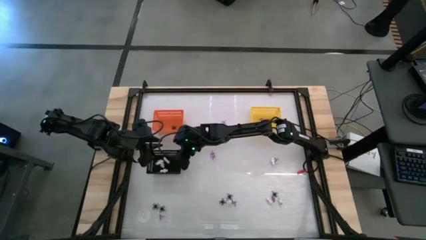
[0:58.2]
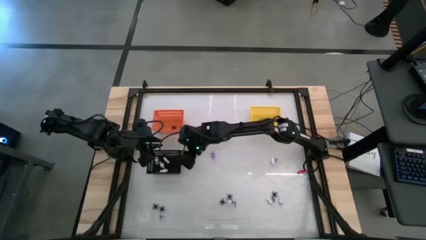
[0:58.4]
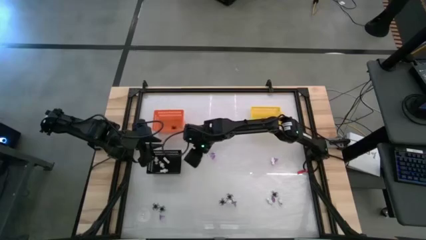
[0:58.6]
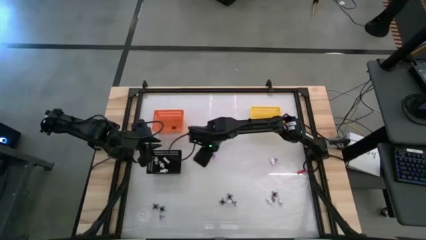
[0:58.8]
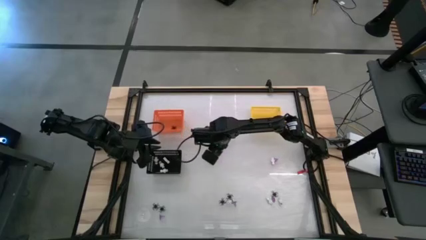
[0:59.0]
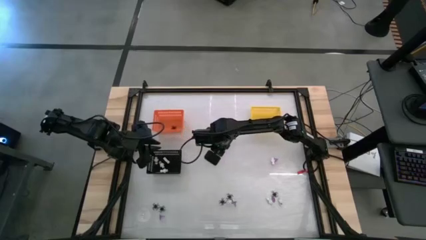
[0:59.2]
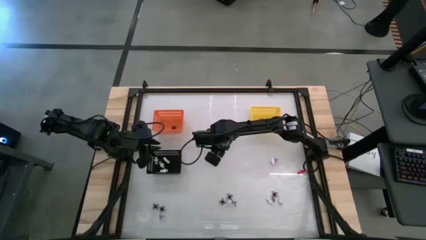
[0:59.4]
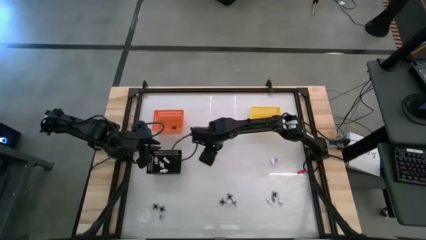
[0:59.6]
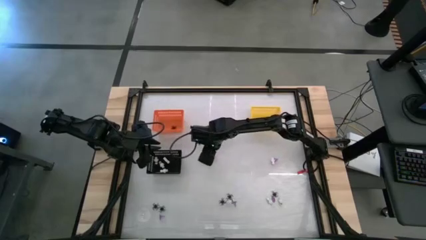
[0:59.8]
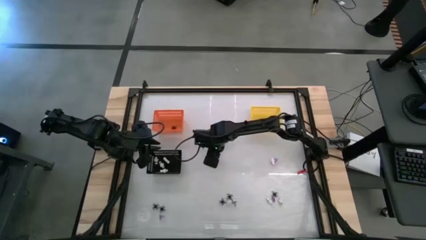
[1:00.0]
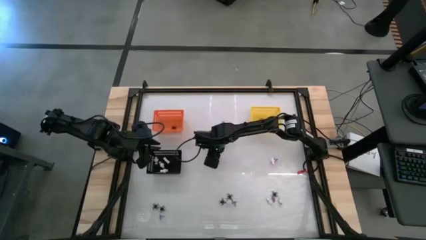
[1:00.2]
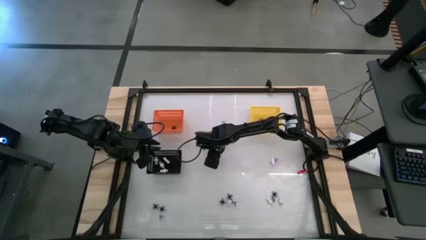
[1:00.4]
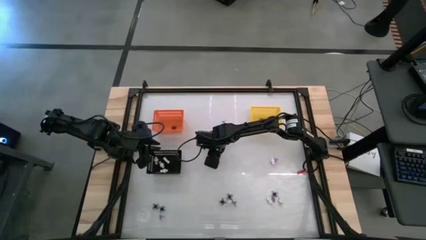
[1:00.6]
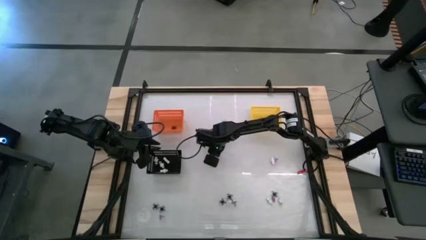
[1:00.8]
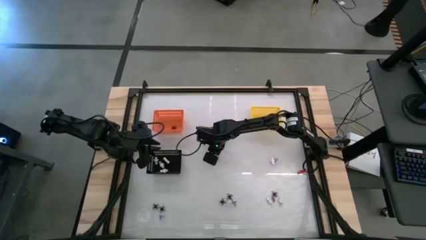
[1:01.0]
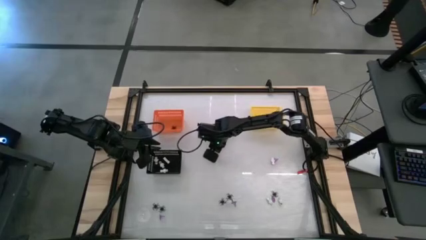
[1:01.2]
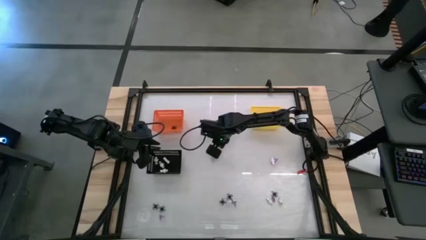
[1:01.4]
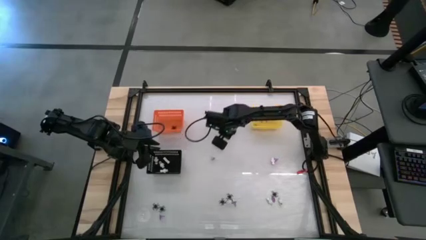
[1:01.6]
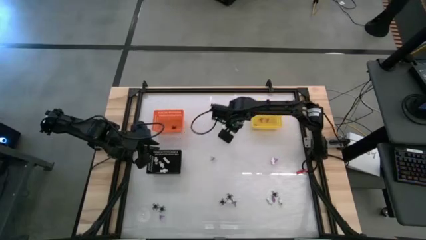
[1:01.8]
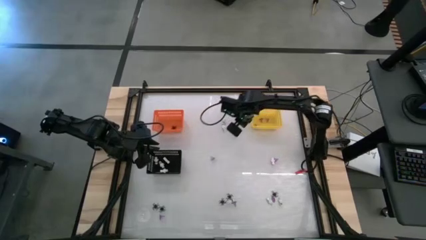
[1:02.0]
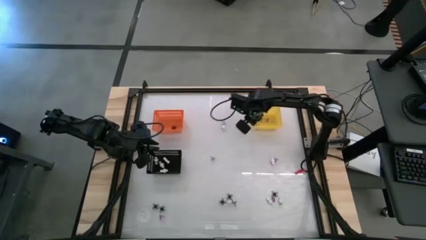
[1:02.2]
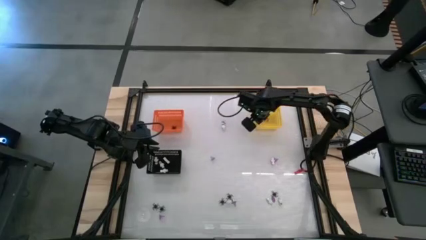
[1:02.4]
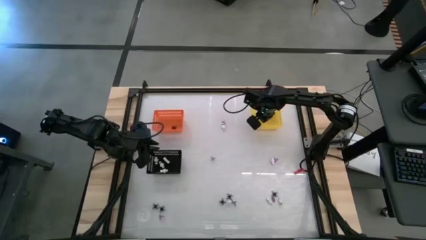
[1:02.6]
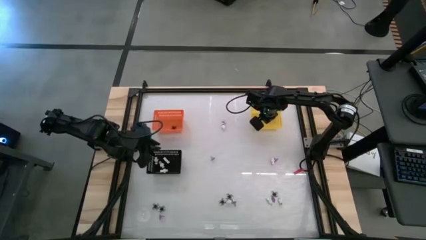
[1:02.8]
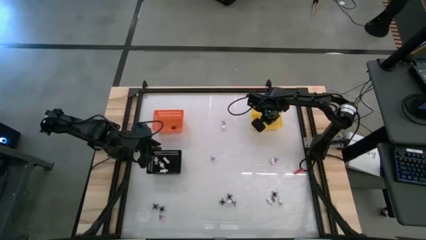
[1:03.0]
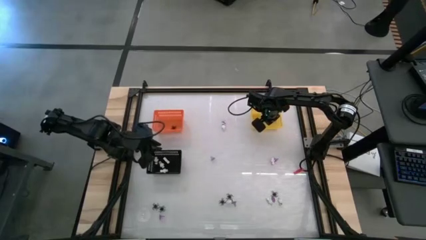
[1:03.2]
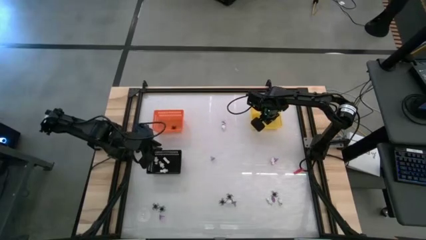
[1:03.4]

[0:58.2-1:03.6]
Task: Sort Halloween decoration
Put the violet witch hat into the yellow bin

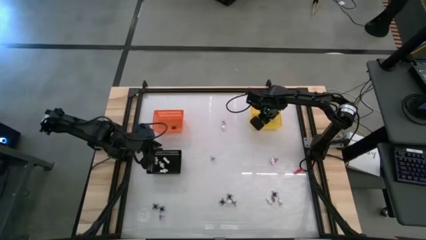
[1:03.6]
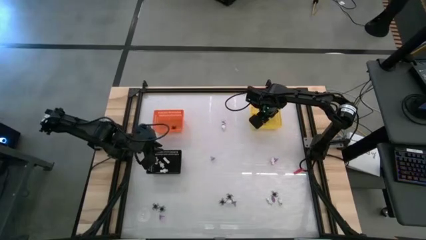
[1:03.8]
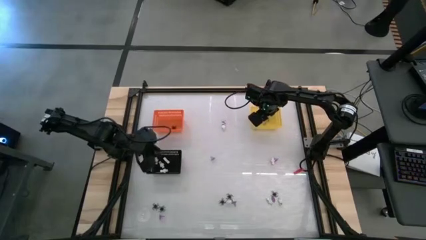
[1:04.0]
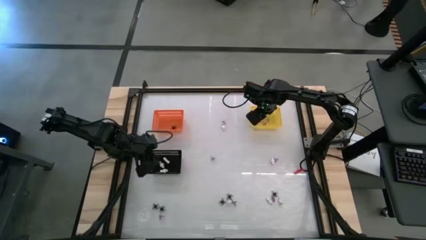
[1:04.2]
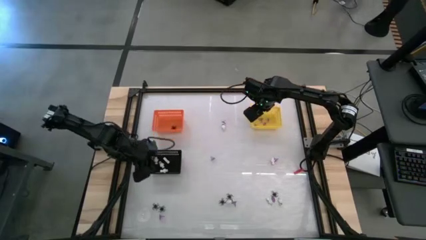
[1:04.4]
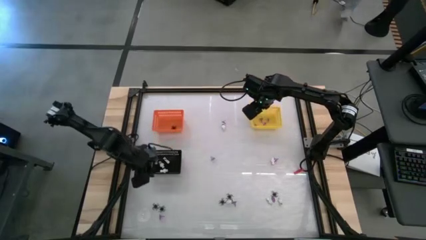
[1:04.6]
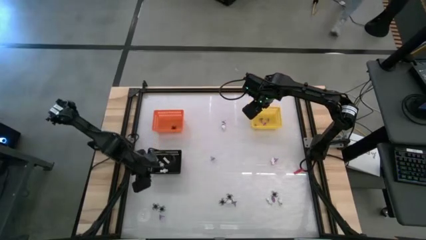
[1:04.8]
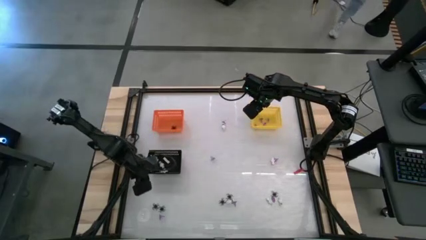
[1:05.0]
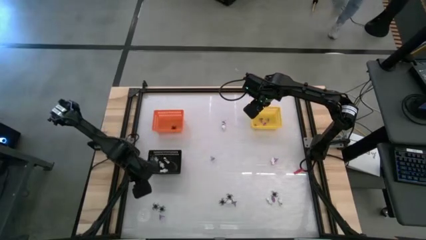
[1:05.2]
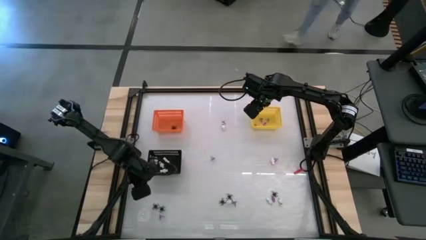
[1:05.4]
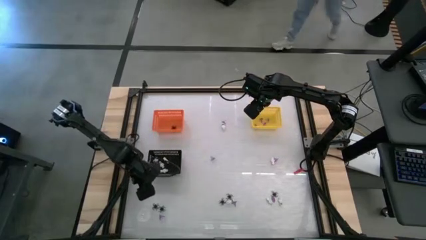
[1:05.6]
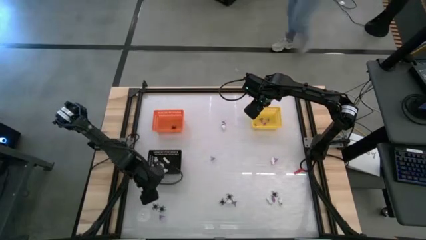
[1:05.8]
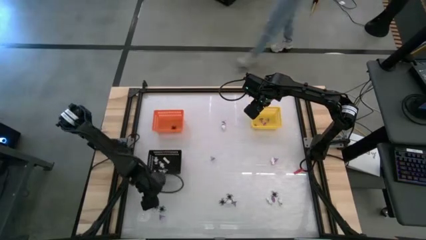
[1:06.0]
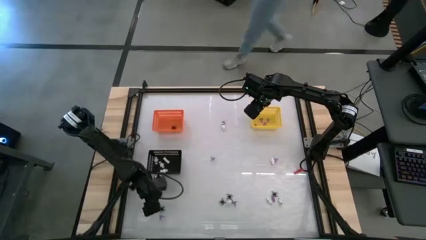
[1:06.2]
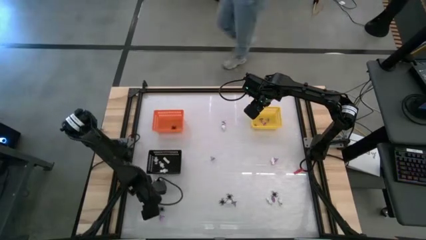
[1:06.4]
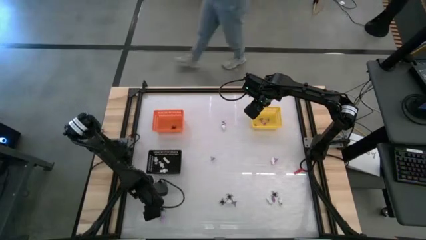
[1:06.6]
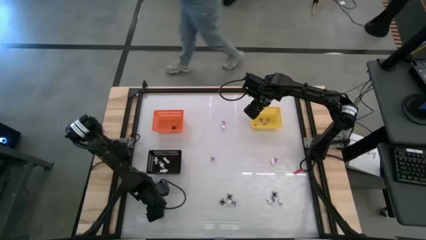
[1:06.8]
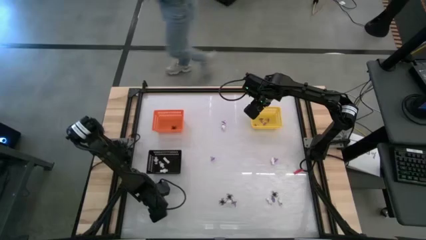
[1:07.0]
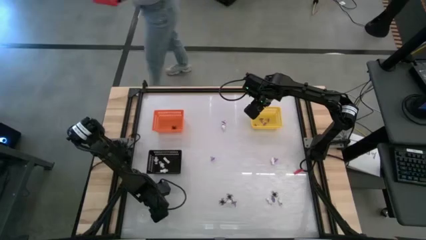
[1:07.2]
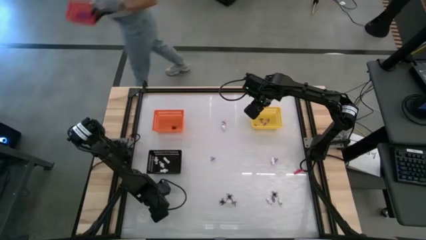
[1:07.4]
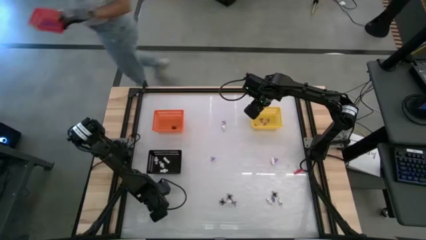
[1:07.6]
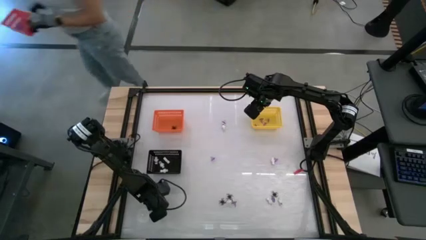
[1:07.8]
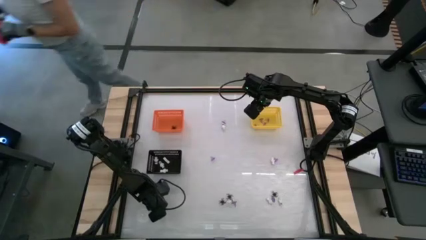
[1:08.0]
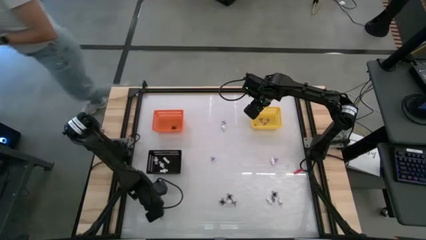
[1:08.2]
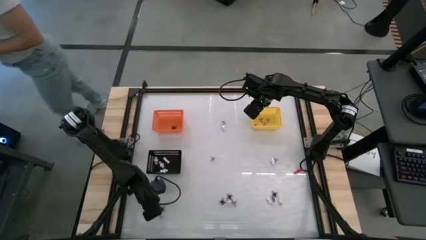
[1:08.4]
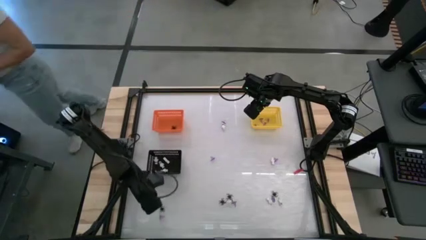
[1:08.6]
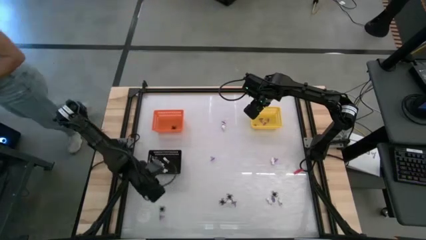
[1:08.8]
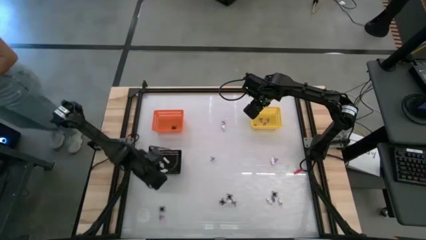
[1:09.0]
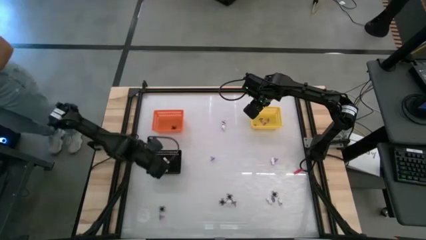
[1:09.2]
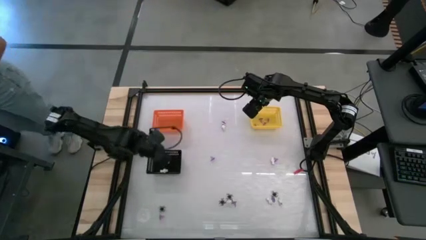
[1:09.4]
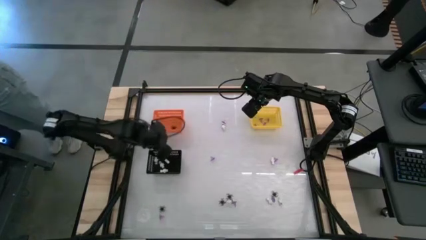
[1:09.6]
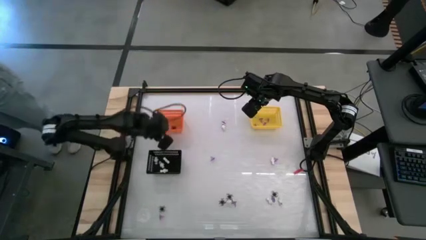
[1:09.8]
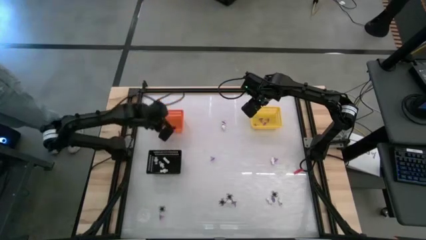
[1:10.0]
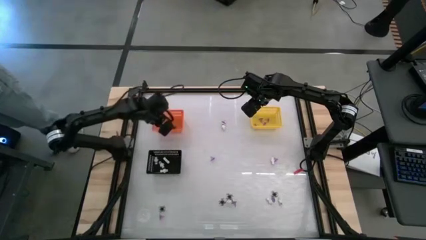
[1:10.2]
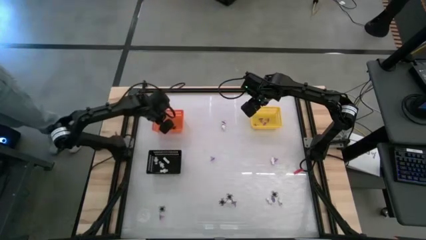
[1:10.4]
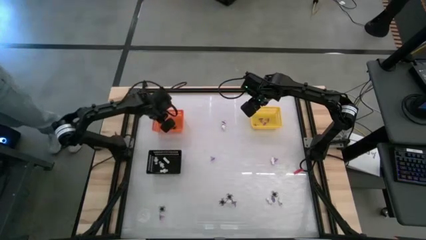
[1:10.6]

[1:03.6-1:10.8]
Put the black spider toy into the orange bin

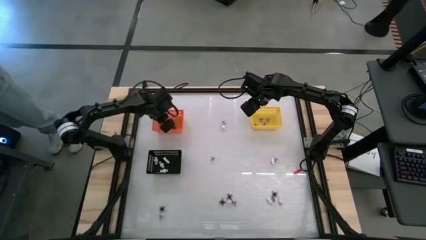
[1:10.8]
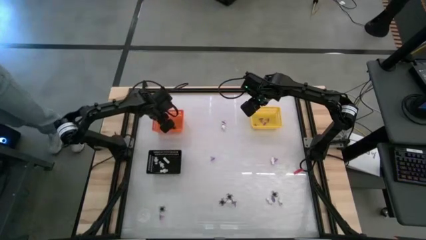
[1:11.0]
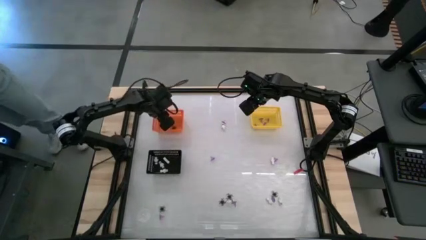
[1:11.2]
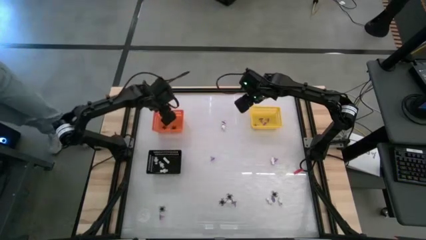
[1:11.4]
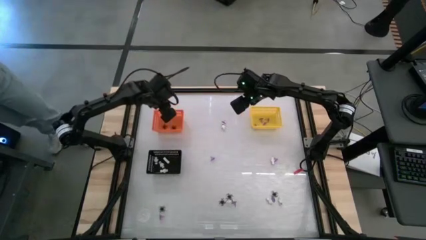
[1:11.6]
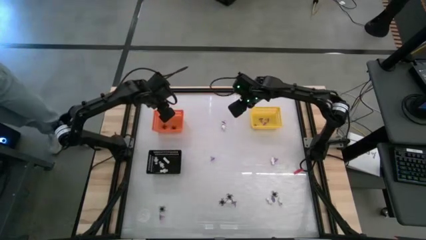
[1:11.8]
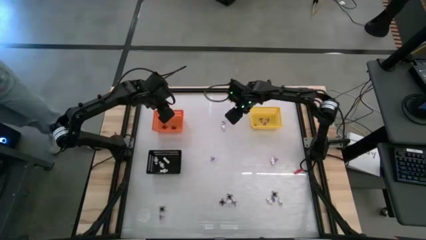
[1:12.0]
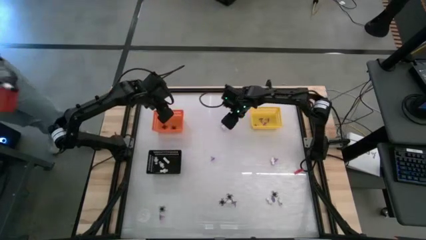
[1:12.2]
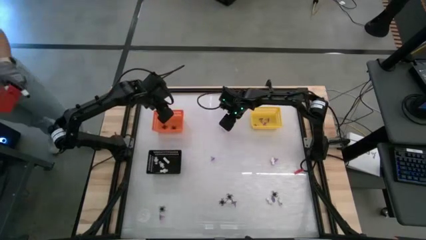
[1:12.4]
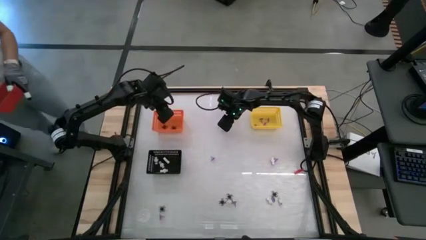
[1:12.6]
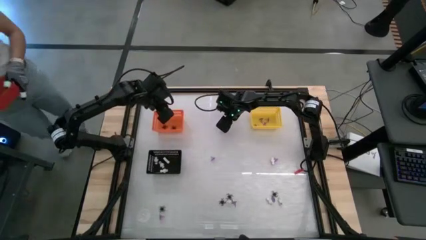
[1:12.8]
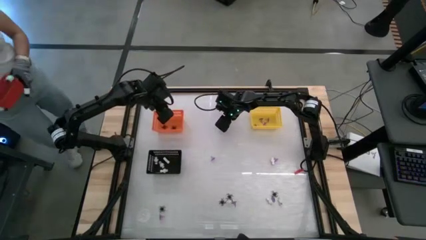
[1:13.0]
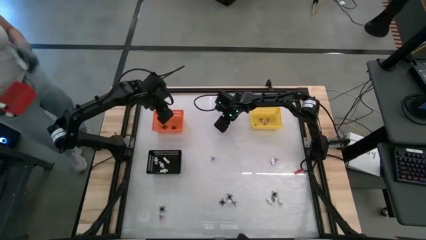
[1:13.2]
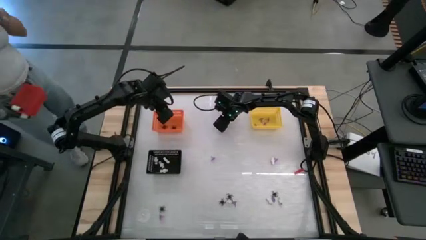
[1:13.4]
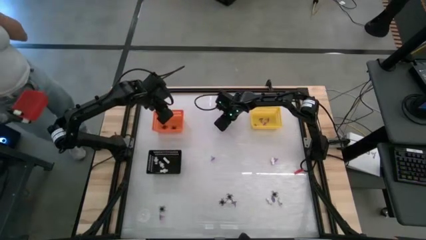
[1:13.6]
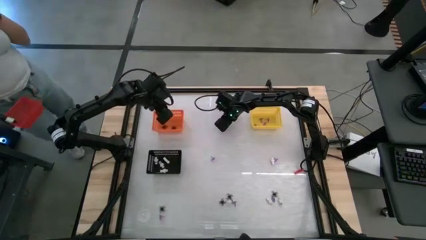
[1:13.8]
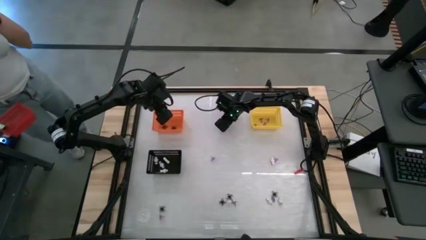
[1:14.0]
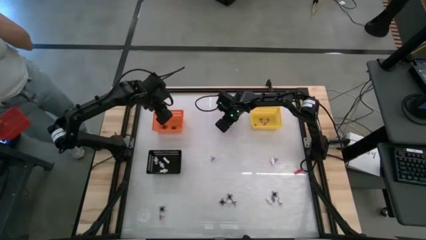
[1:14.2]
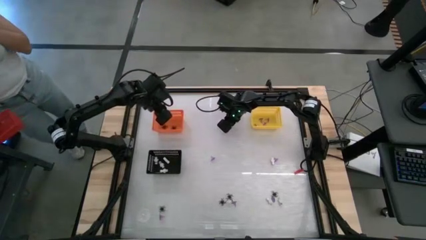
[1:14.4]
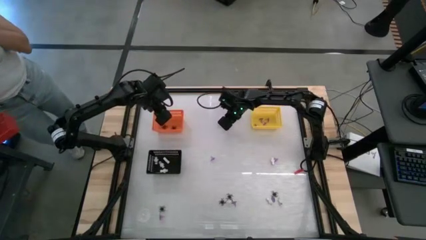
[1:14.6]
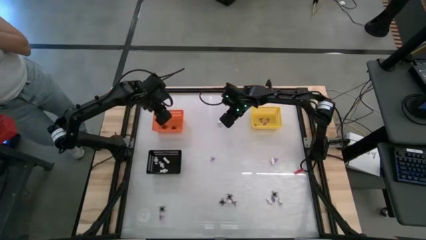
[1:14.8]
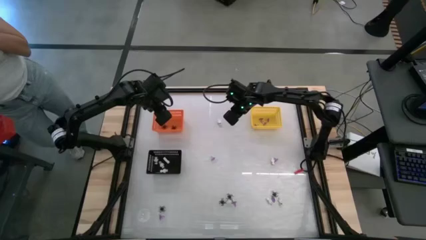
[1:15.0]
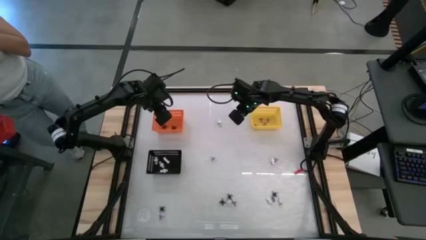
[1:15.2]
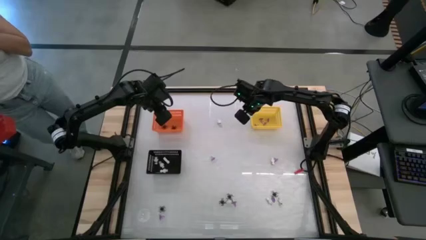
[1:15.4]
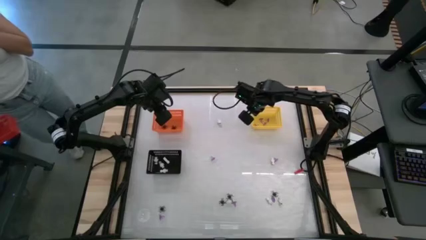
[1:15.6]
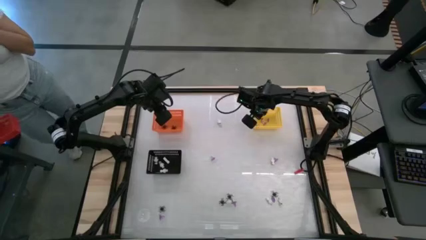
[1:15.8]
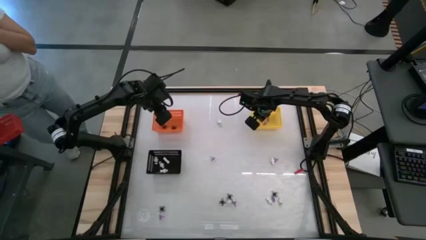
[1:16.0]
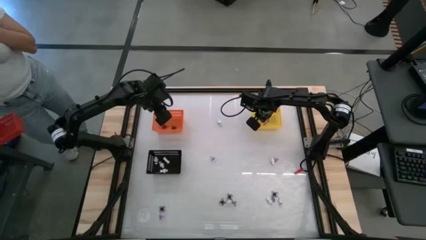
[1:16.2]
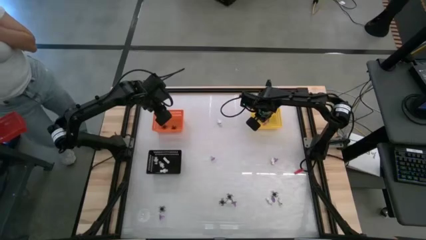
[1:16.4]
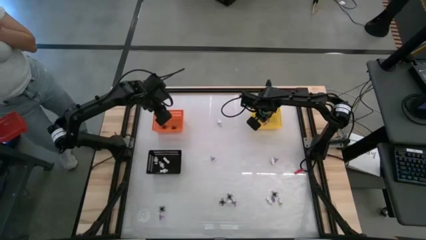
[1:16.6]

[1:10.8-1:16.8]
Put the violet witch hat into the yellow bin
